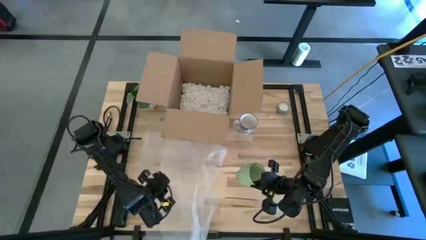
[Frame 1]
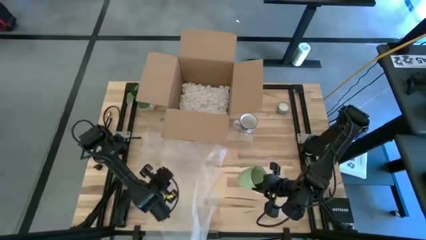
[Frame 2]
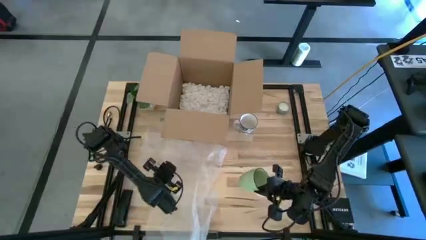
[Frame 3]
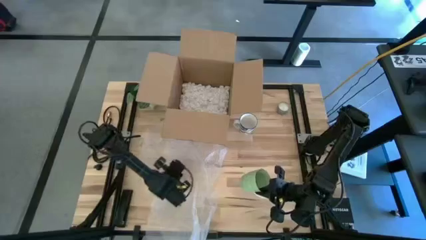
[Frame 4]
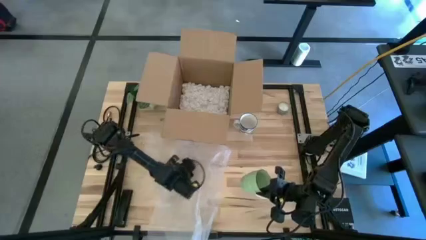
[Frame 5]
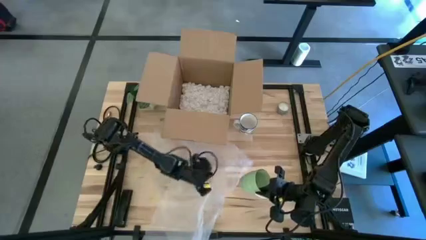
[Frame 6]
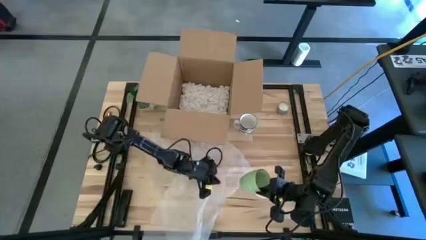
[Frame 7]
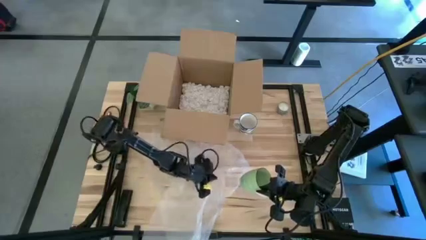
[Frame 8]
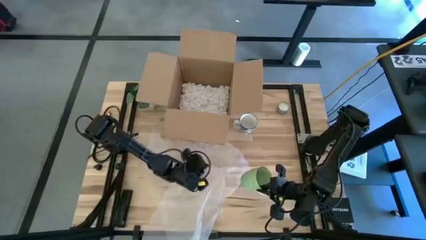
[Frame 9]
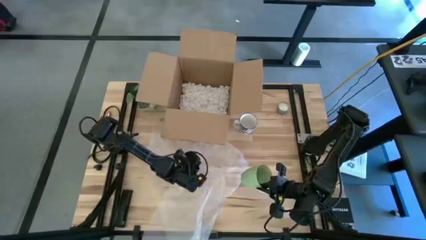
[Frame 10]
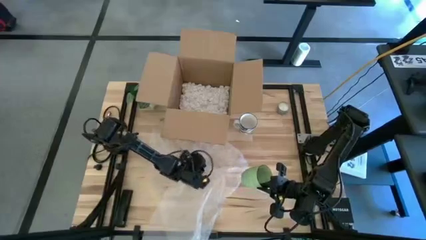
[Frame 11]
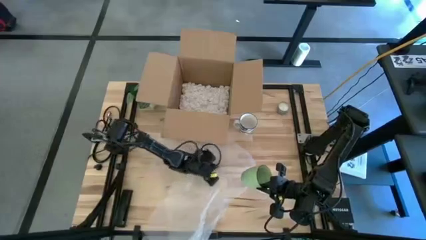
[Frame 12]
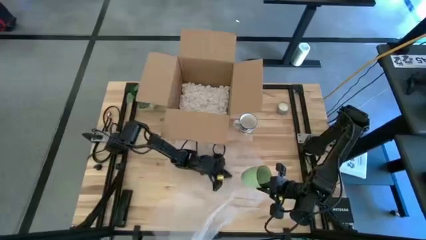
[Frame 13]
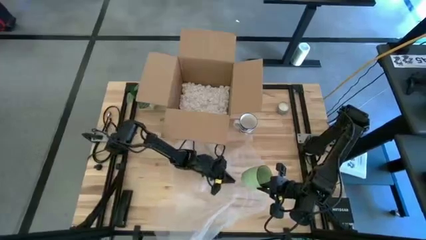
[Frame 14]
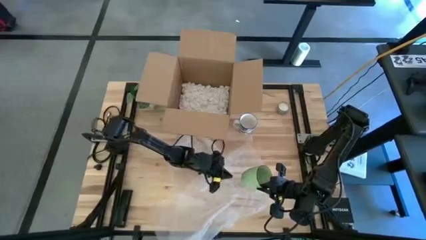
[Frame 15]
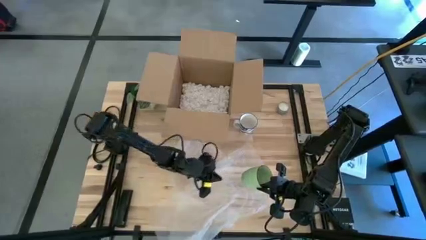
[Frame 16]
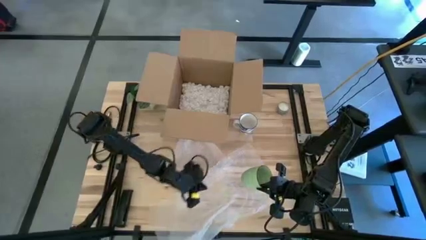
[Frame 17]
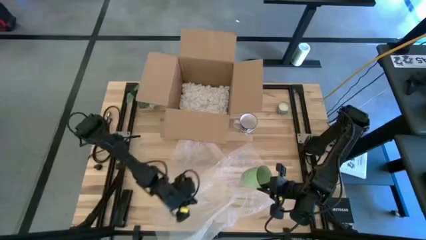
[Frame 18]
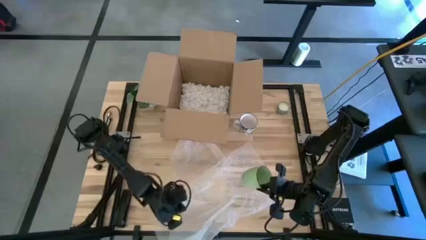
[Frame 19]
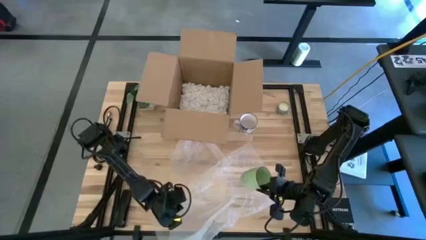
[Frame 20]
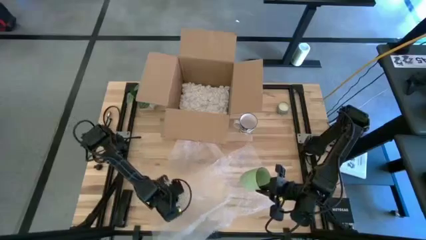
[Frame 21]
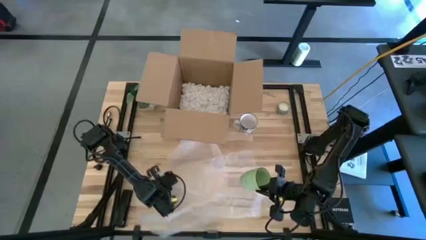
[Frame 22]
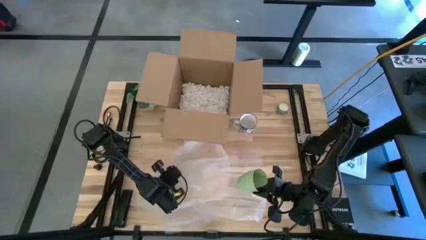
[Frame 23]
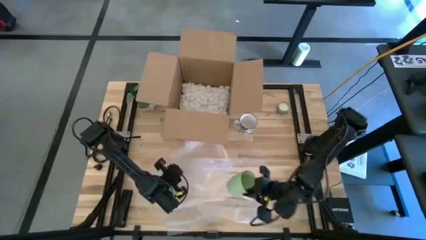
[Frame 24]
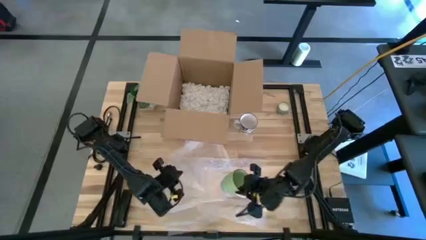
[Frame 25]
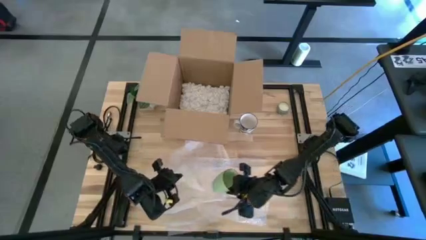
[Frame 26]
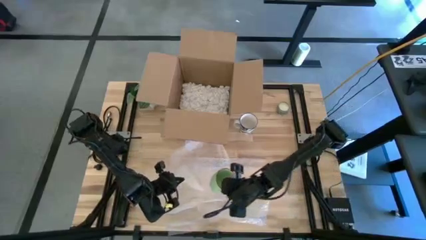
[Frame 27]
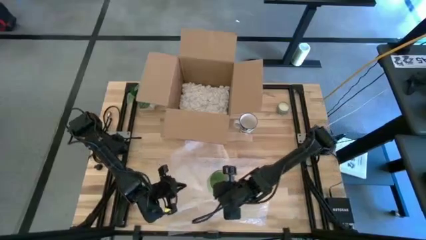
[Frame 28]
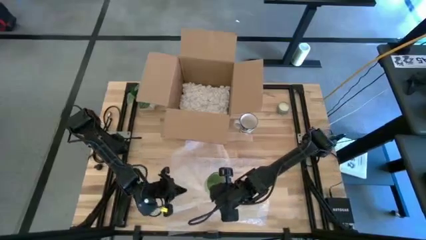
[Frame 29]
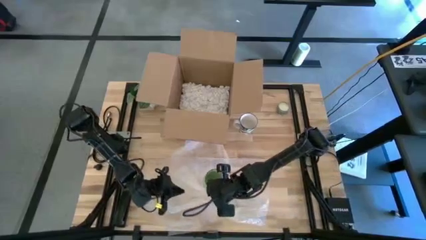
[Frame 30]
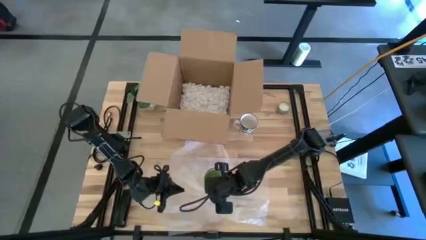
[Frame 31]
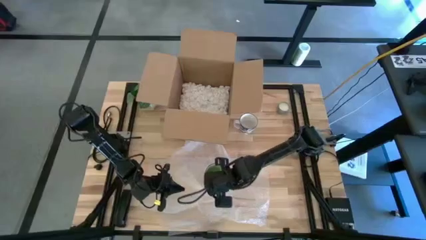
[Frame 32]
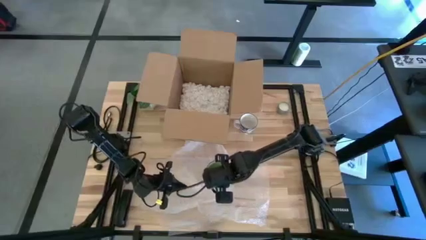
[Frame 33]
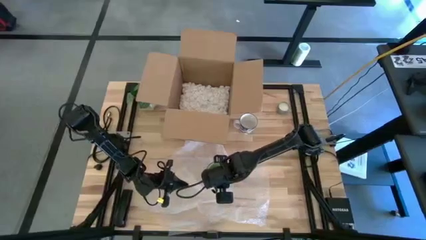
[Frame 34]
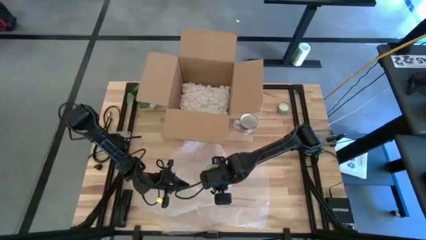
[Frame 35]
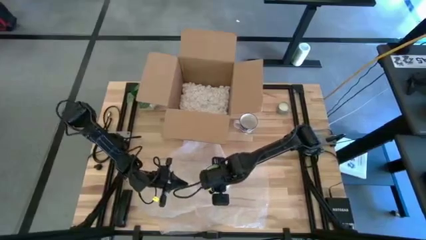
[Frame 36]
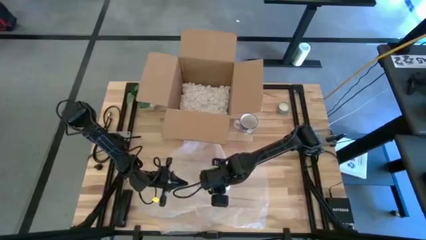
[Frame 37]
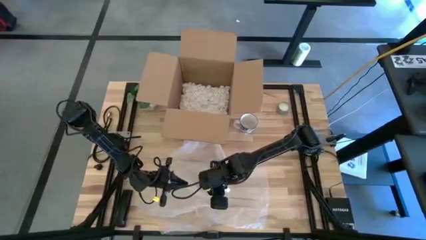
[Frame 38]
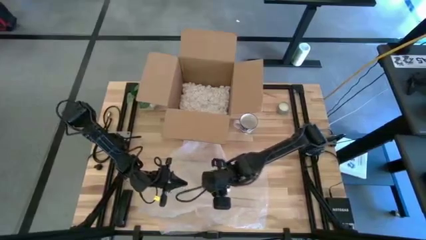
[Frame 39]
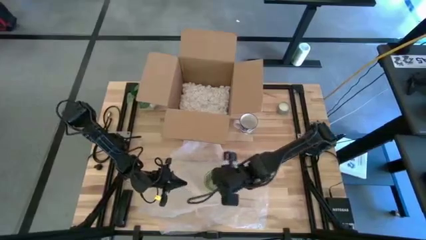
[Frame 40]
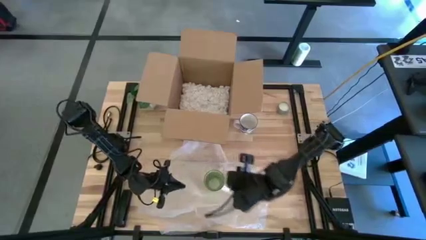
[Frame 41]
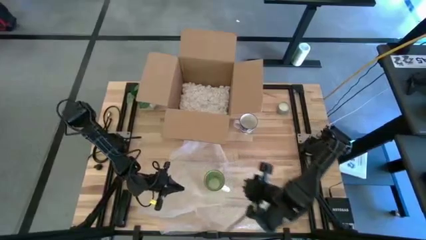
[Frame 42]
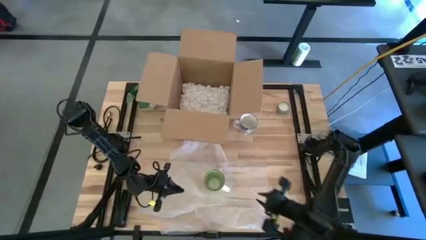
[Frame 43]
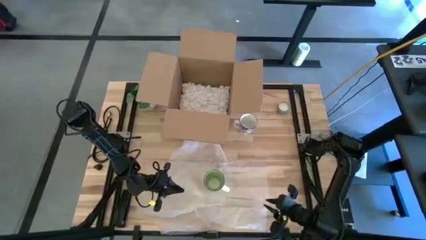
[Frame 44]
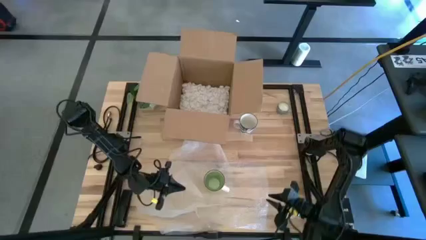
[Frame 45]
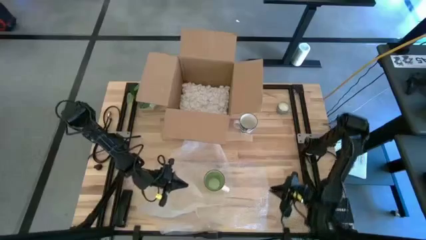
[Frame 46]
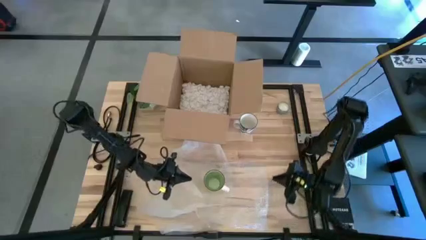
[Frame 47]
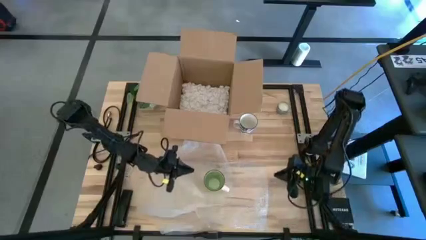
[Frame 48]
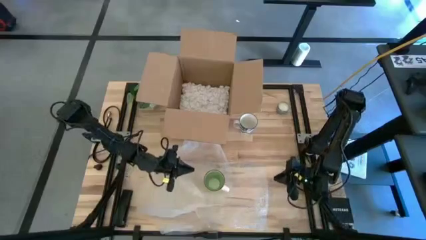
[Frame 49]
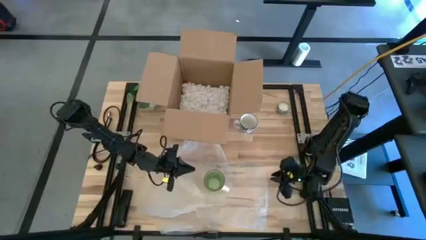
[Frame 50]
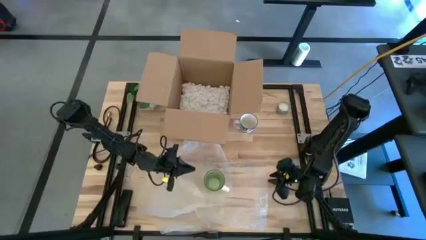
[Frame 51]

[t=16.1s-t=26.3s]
Task: wrap mug
Wrap the green mug with the bubble wrap

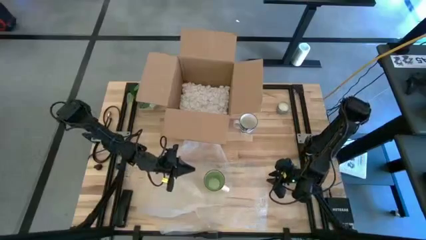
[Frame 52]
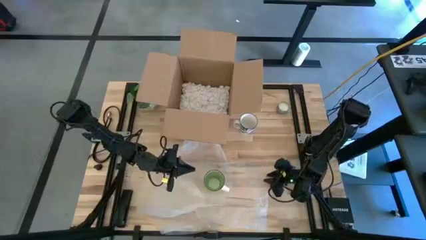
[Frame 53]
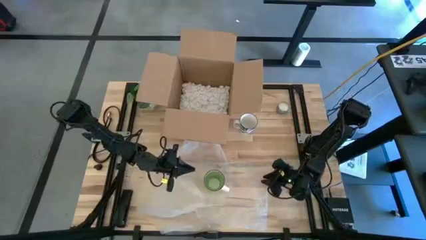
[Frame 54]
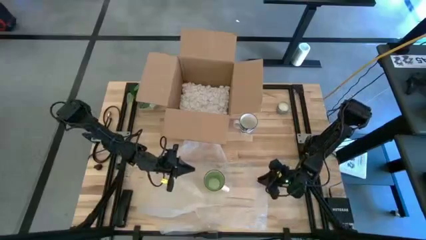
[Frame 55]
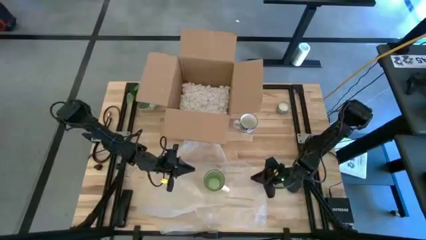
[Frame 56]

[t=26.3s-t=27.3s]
Wrap the green mug with the bubble wrap

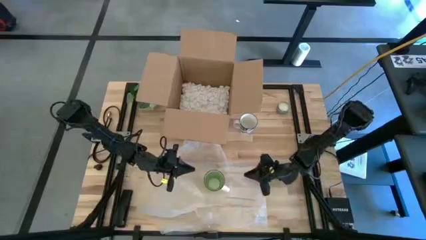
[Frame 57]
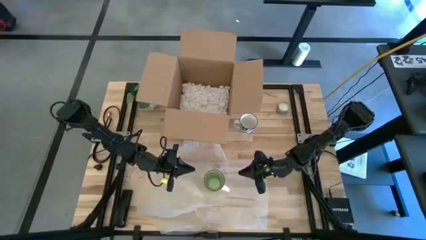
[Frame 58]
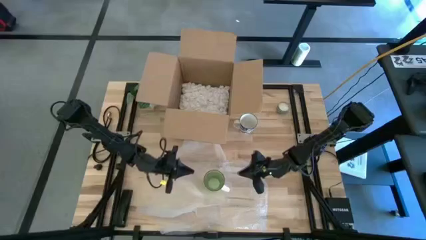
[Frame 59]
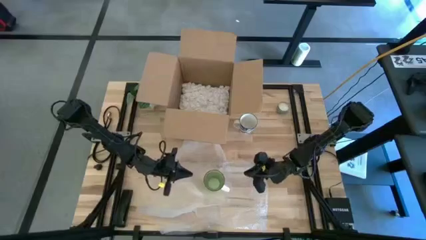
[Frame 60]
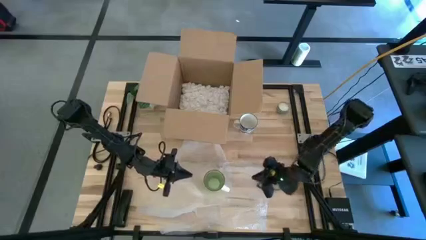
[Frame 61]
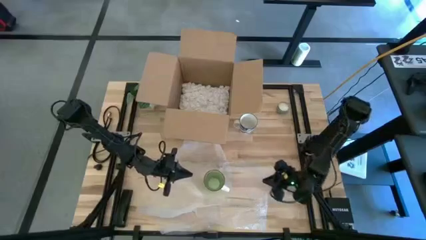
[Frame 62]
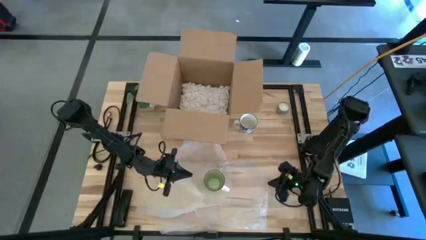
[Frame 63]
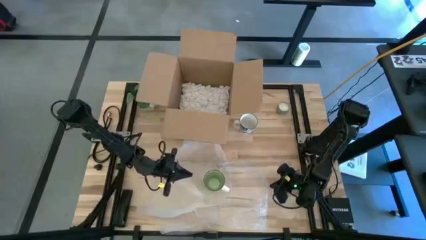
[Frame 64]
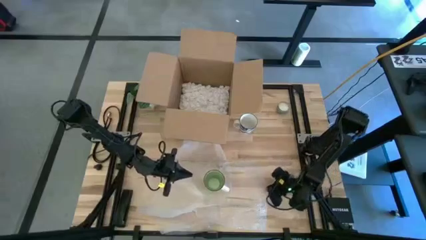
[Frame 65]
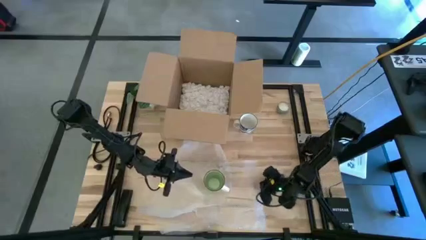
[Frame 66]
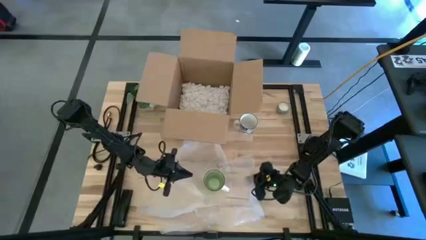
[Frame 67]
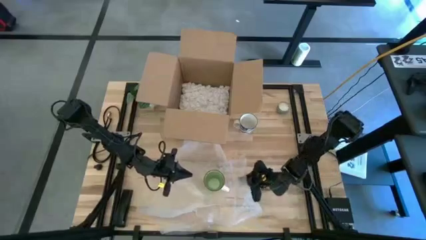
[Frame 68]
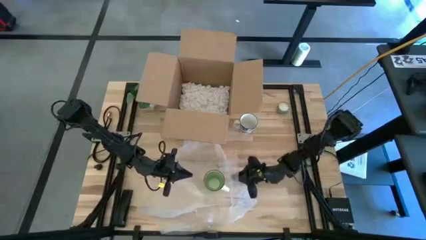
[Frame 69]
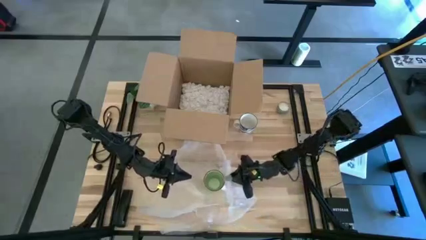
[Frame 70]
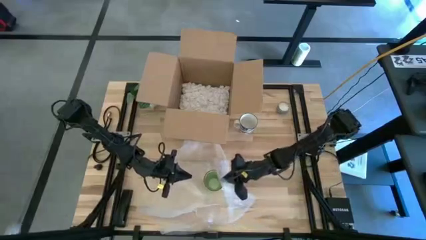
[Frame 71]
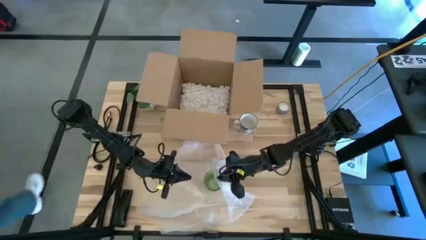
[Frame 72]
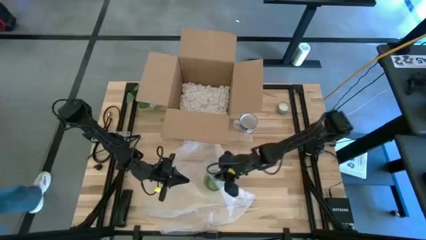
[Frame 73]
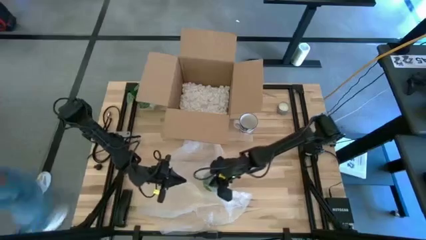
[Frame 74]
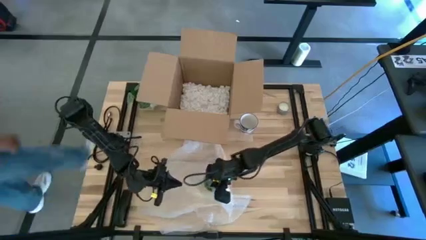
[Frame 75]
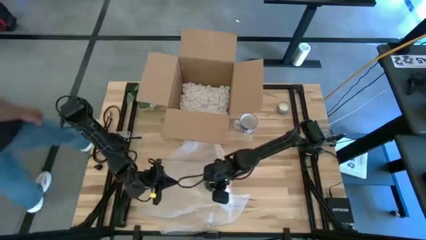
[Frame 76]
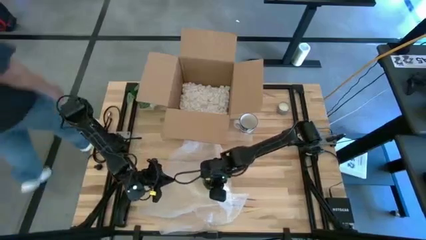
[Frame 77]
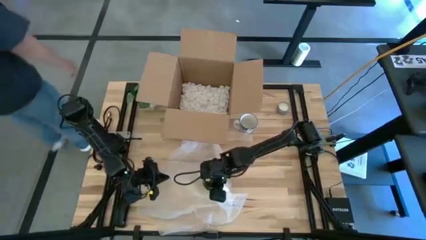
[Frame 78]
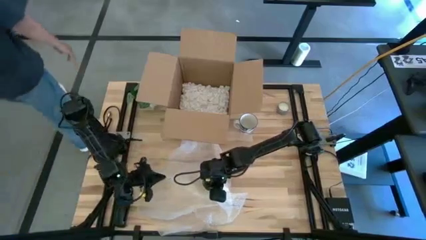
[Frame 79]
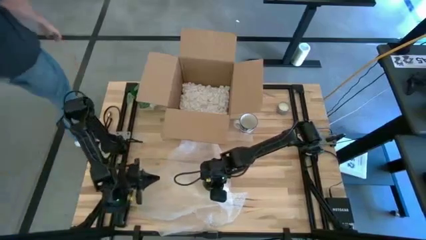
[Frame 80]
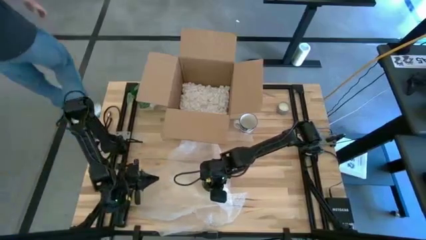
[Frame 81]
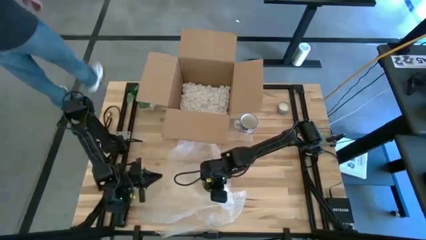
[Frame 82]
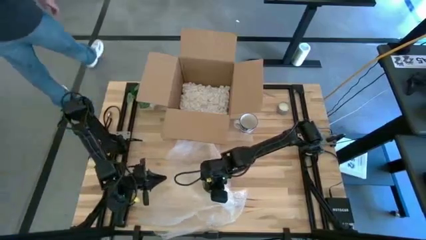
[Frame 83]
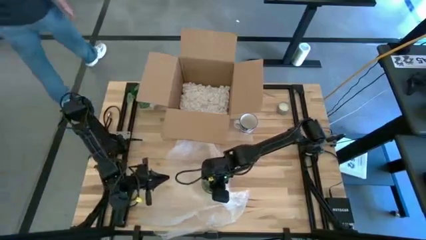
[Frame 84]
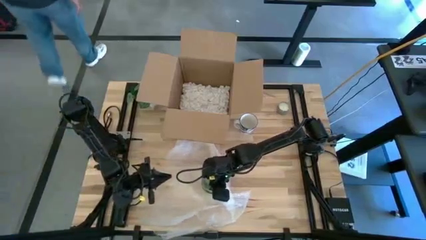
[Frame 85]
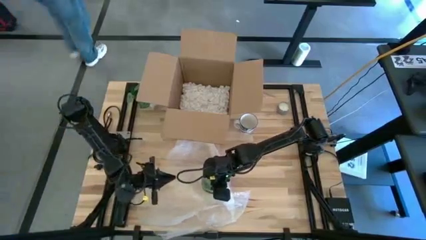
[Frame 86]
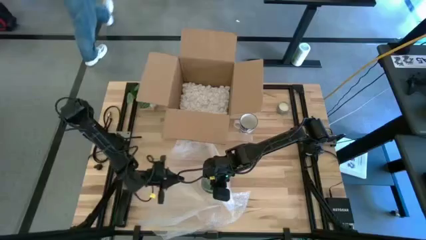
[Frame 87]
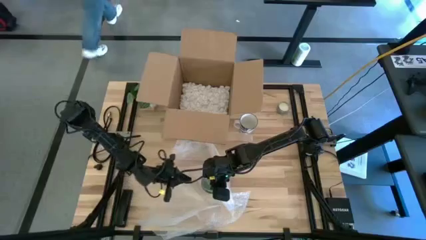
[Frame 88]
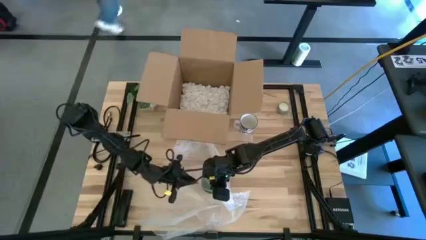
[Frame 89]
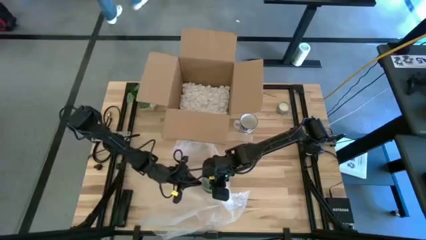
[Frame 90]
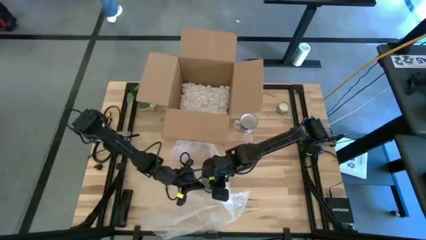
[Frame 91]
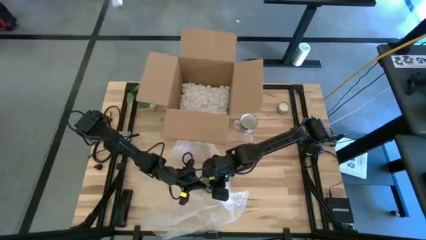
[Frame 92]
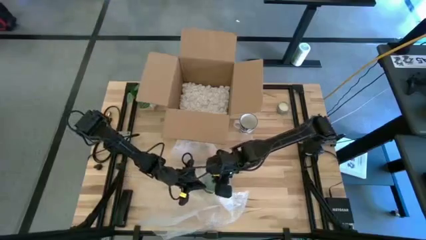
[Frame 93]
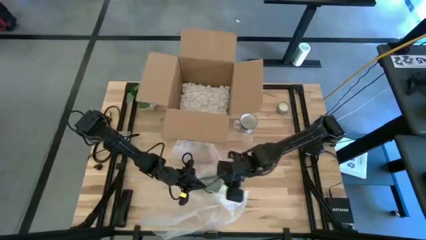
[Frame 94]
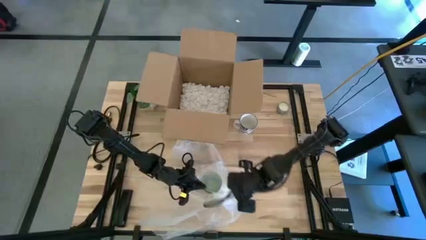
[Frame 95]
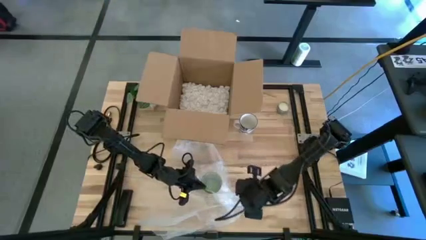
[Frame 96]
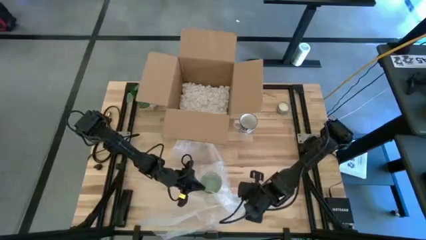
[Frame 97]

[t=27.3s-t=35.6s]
Wrap the green mug with the bubble wrap
